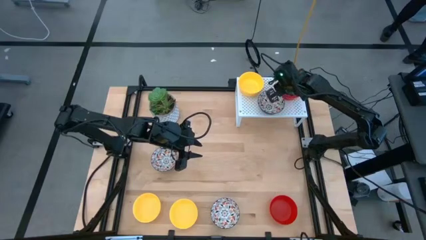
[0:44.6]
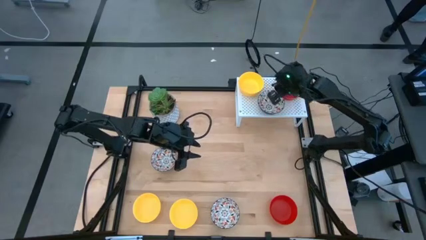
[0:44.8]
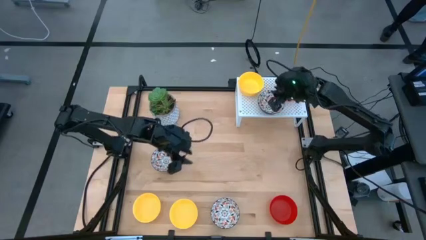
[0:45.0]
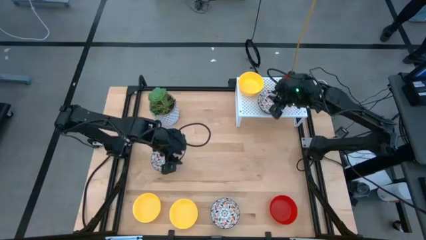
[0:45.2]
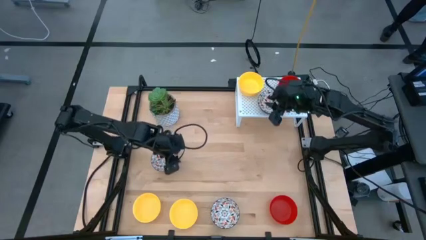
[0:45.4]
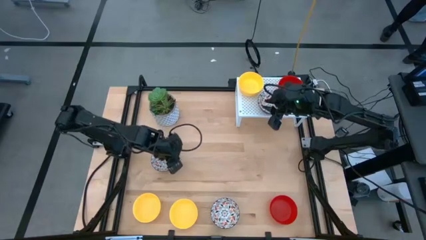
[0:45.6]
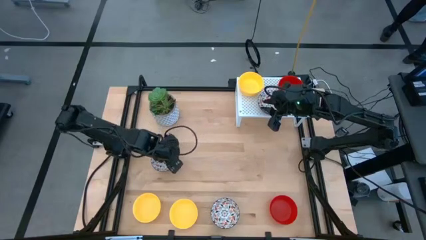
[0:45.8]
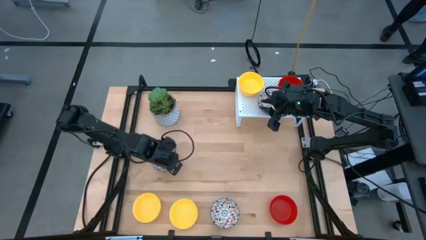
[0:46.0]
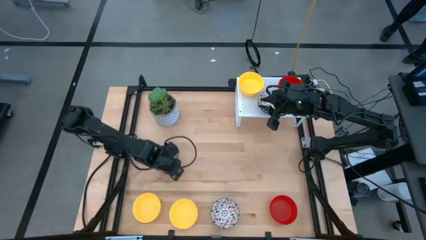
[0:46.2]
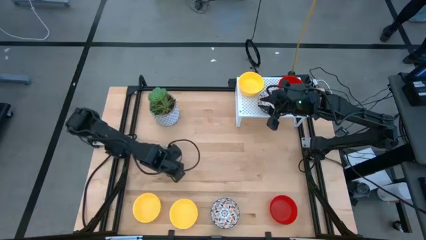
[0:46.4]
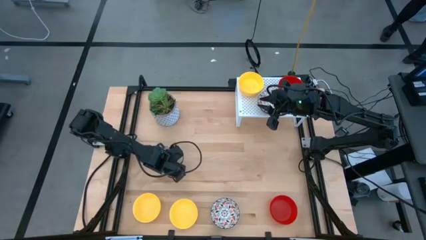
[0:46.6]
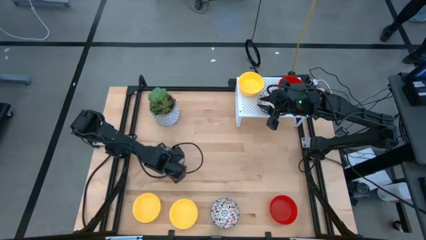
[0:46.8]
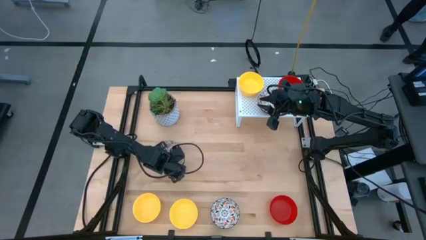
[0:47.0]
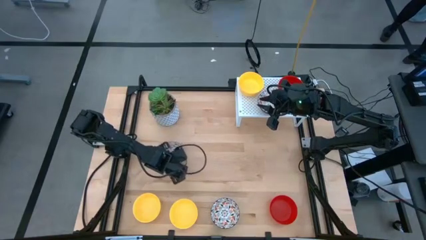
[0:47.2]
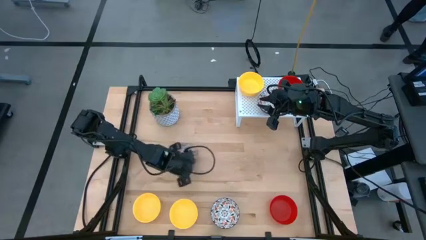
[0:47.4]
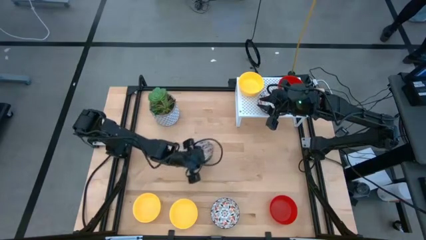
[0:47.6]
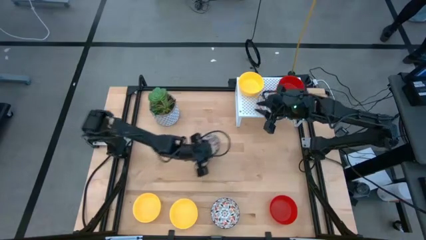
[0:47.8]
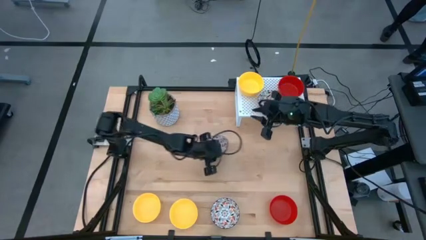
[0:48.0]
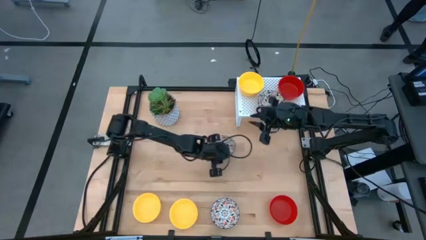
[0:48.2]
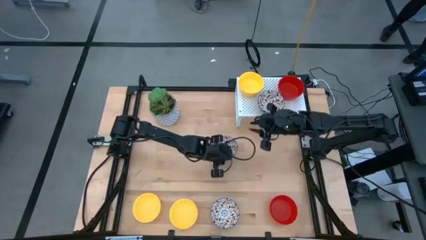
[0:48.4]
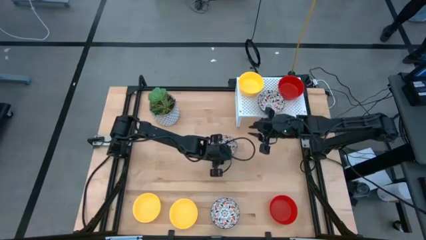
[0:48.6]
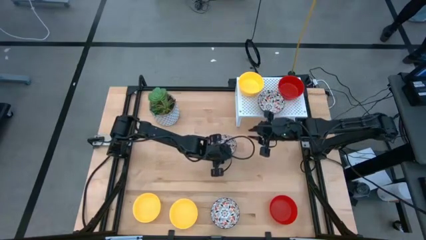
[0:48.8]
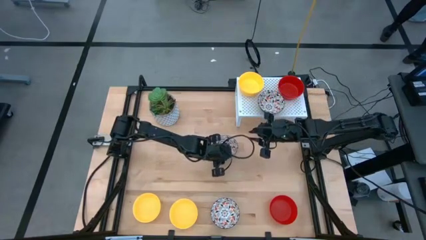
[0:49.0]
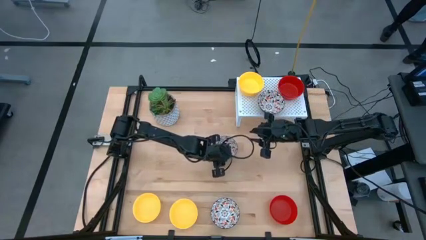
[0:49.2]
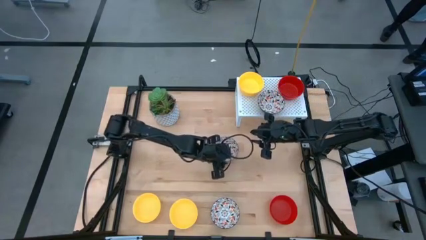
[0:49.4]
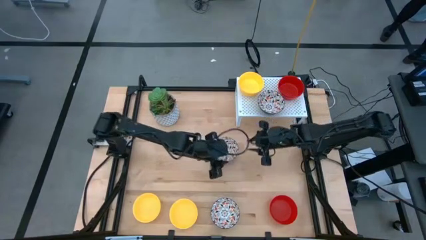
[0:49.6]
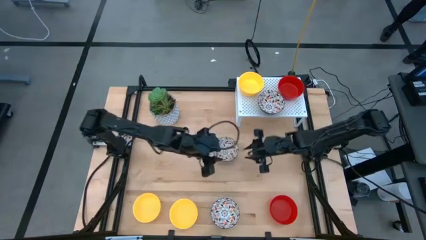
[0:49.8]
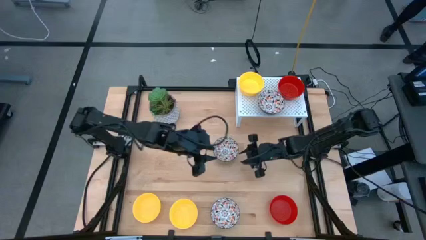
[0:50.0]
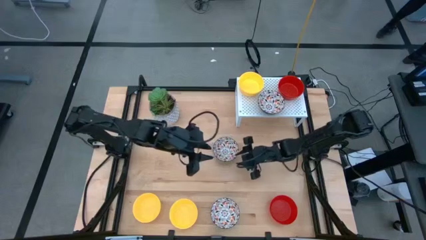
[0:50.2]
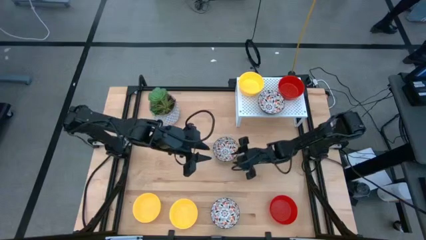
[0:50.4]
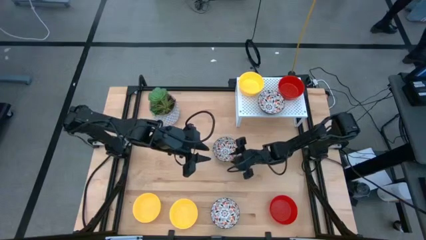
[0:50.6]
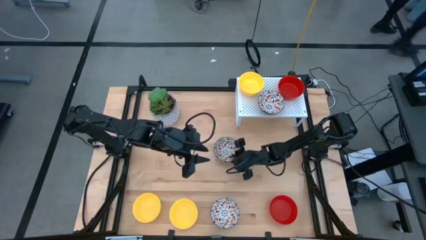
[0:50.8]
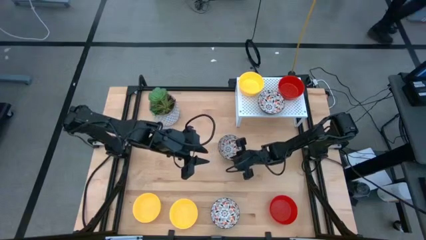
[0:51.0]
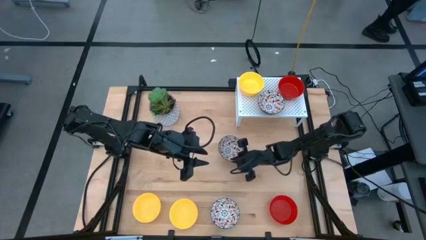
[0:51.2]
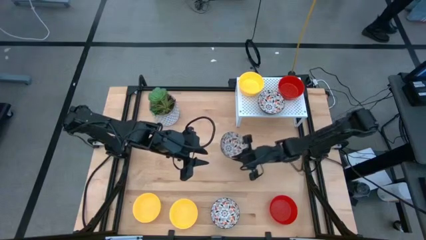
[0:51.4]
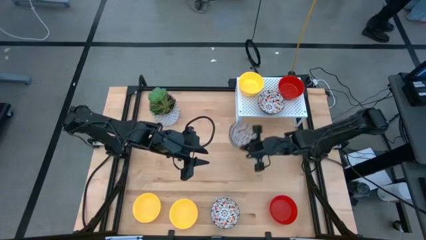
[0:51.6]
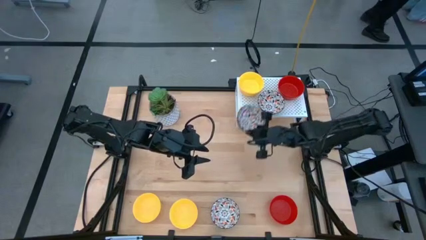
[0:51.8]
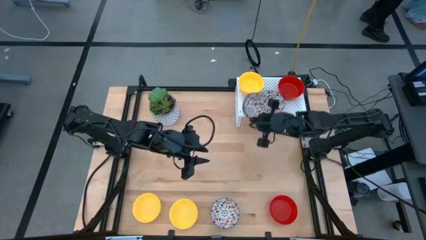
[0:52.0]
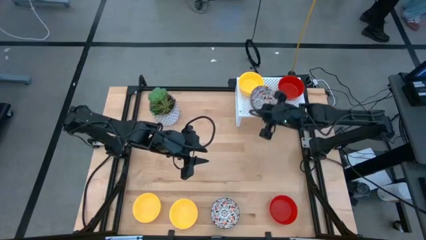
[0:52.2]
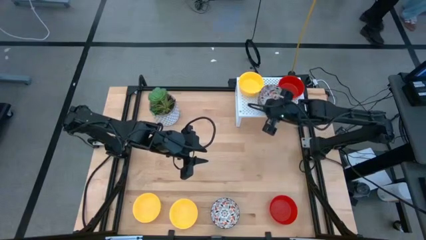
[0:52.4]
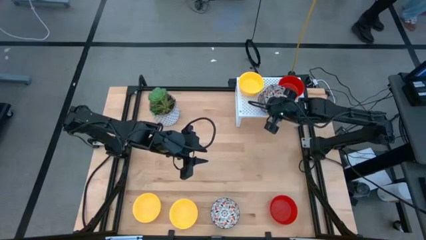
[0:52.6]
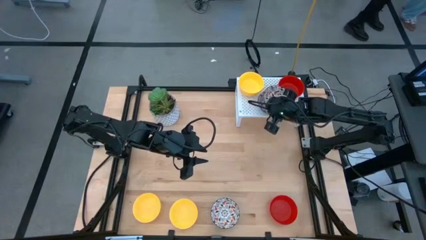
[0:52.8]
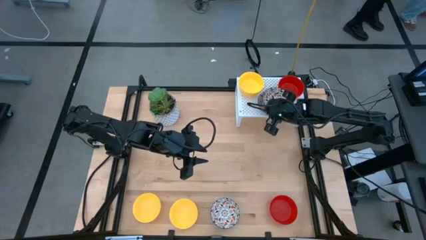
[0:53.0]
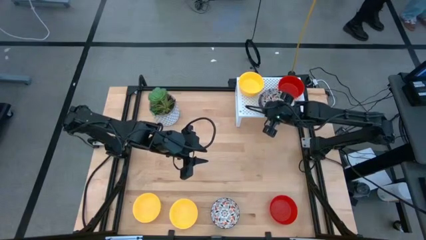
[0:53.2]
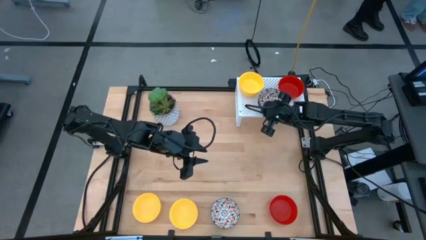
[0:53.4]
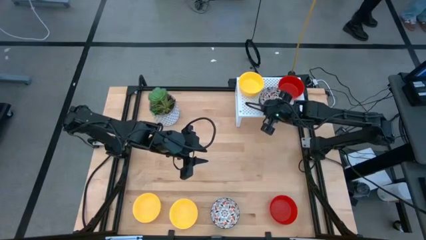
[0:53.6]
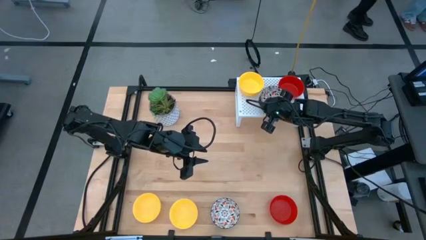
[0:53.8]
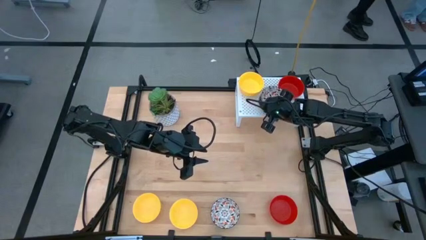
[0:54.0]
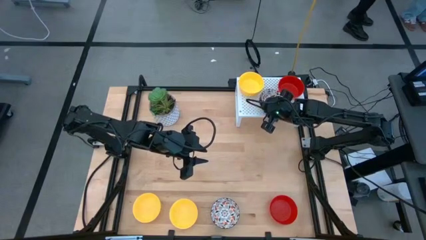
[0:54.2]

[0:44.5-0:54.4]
Task: Pick & Place Mini bowls
Stack the left white patterned bowl on top of the white patterned bowl on the shelf

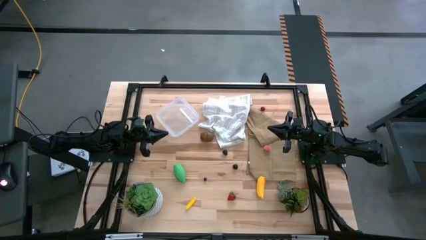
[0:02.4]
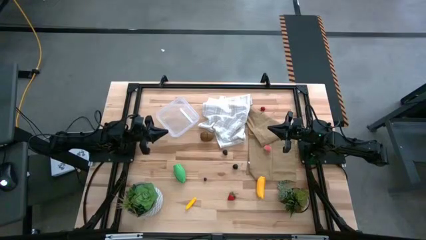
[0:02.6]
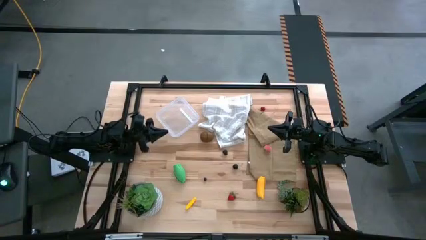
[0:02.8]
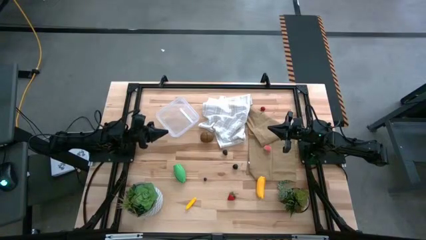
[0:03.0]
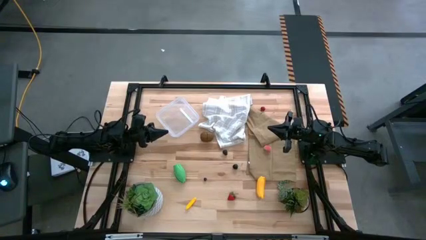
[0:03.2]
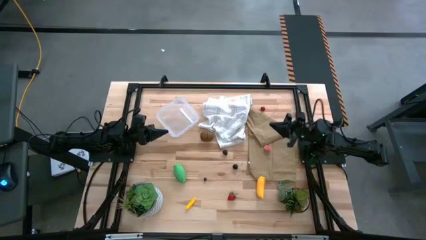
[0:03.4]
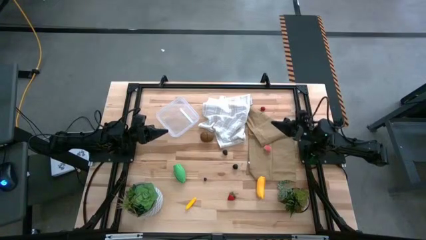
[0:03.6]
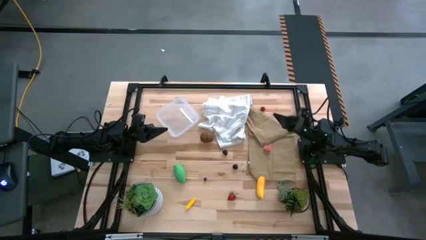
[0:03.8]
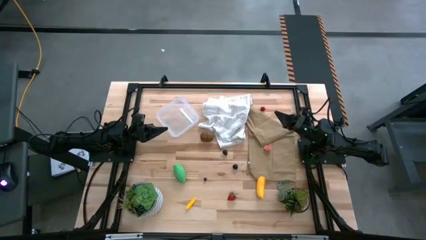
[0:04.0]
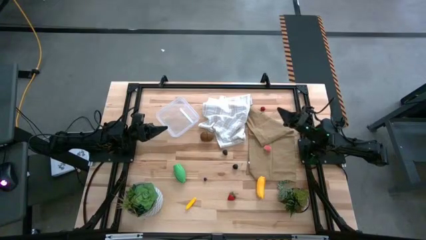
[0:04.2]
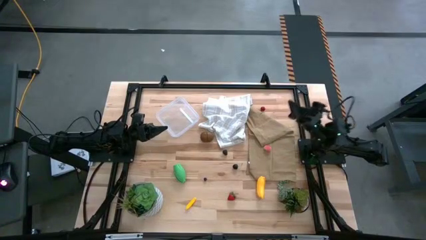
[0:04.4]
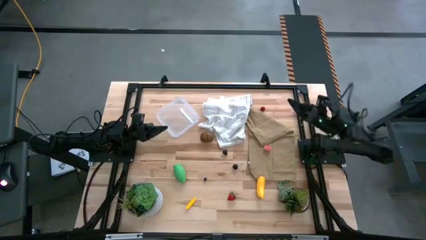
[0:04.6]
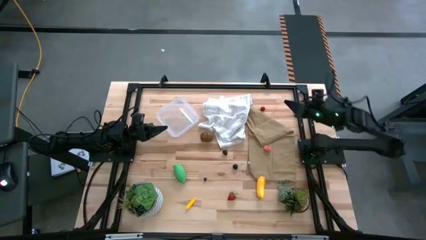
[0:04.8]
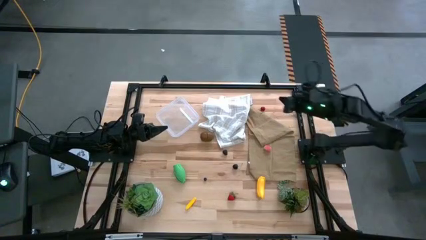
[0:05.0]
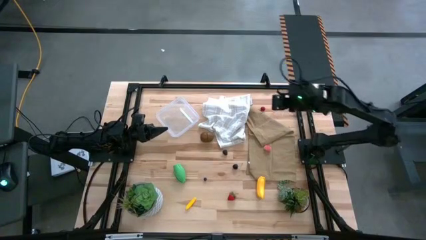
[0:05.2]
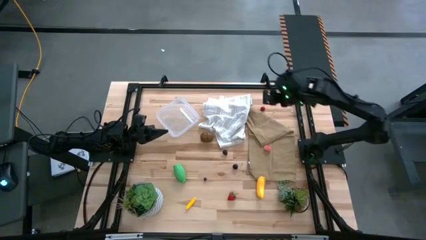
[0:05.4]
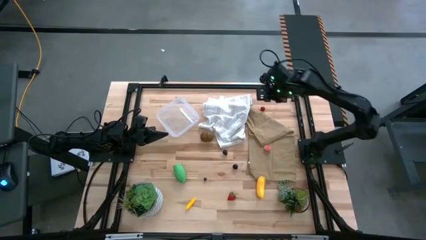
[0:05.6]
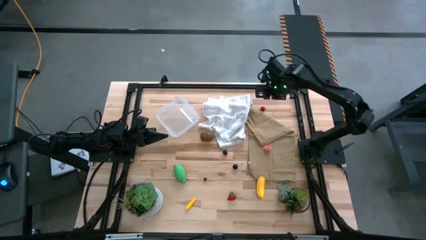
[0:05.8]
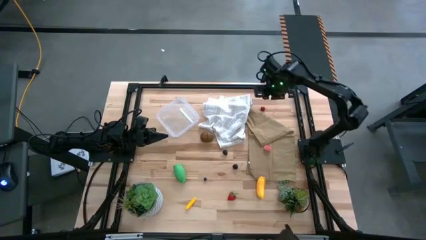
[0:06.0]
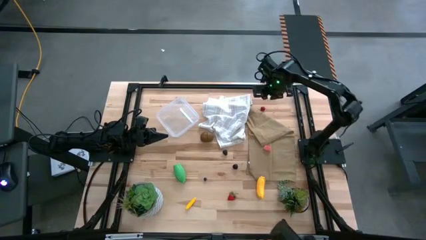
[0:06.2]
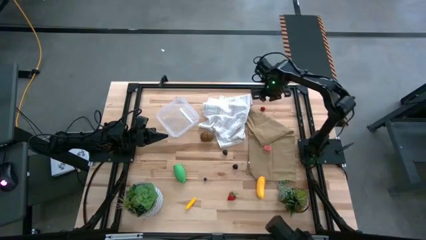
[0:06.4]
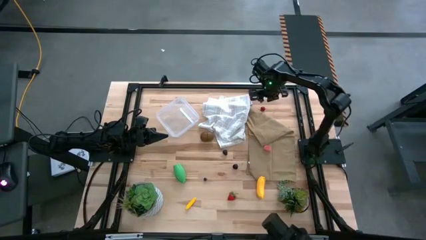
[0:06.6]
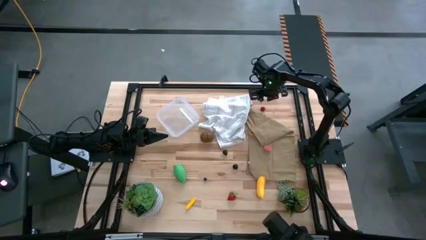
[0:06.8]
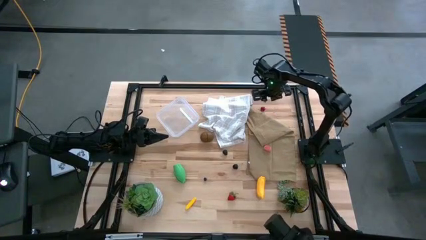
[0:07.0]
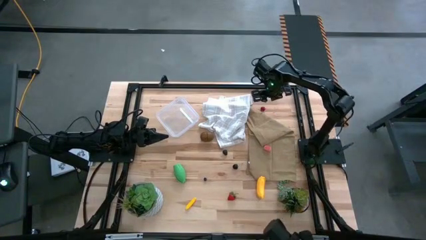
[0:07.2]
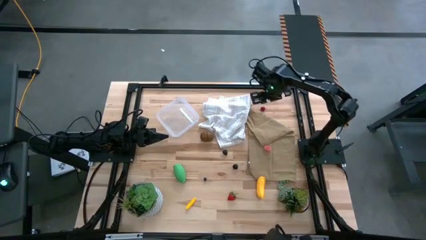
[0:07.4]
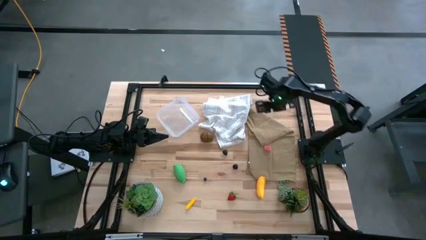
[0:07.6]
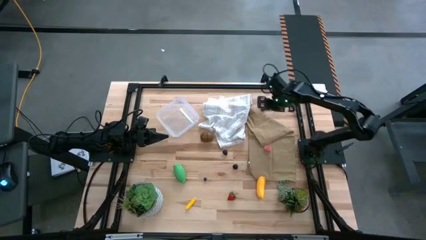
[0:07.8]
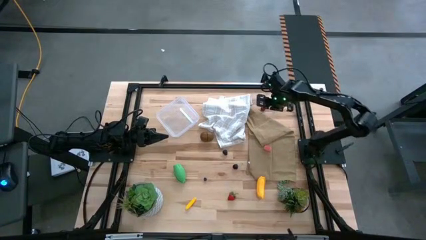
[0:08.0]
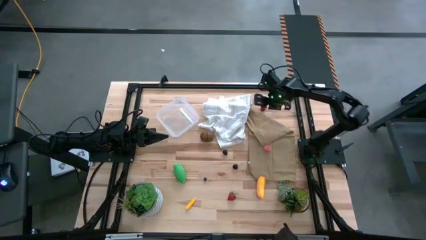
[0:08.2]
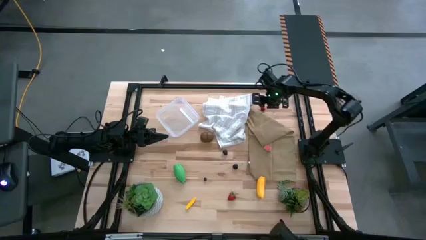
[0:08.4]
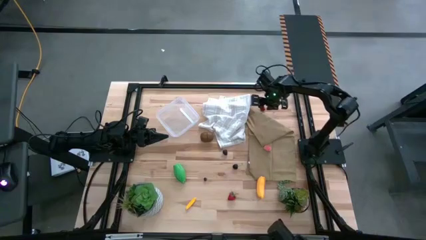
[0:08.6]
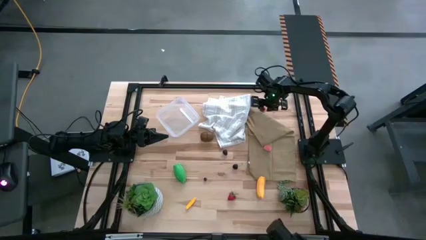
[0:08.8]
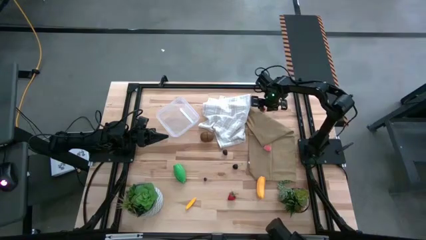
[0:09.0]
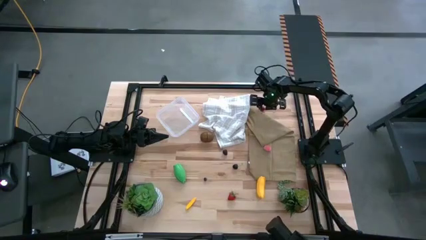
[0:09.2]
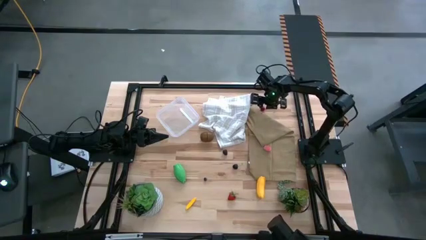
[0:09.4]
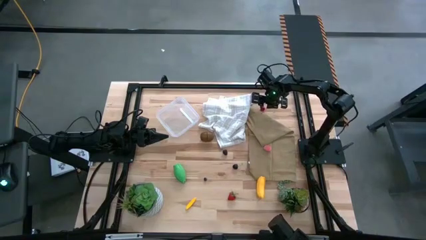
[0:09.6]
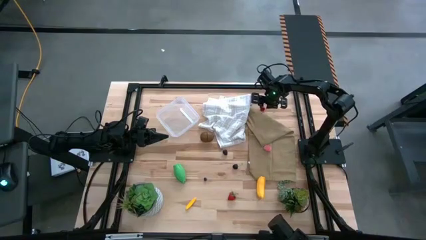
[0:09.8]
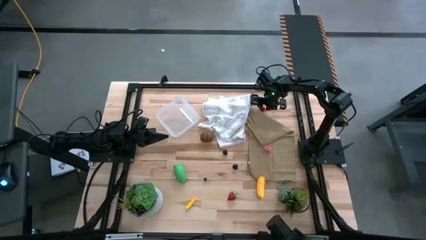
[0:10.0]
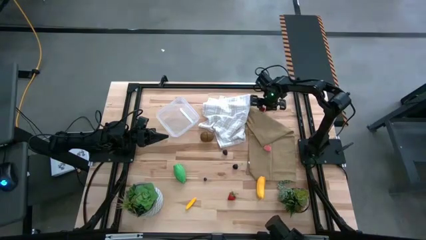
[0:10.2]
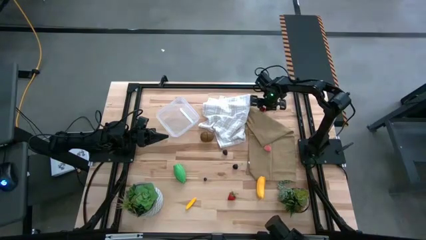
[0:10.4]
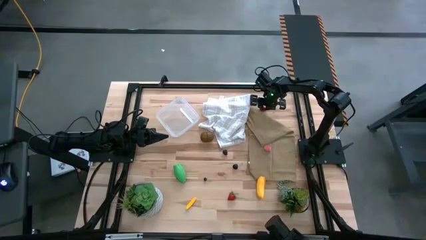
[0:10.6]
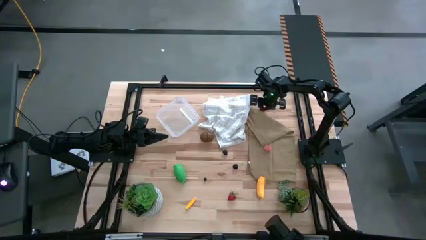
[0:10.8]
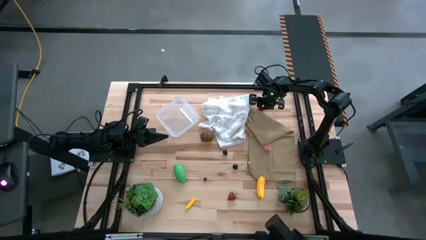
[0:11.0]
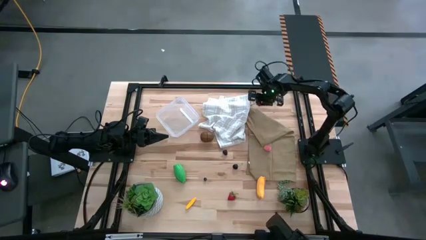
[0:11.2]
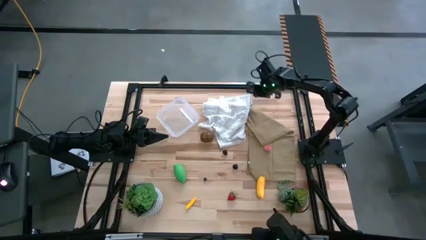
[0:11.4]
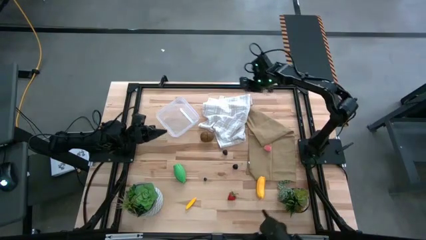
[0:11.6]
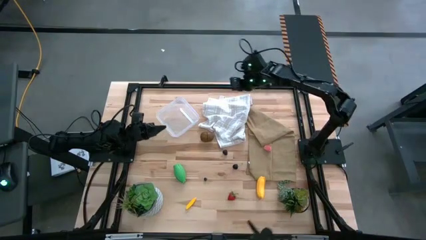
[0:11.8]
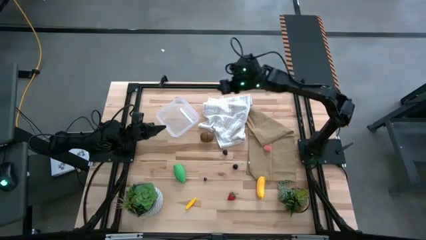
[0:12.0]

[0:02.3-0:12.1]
Task: Pick and placing Produce into tupperware
Put the red cherry into the transparent bin
